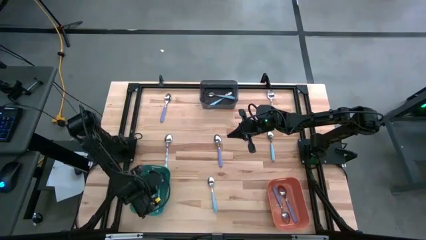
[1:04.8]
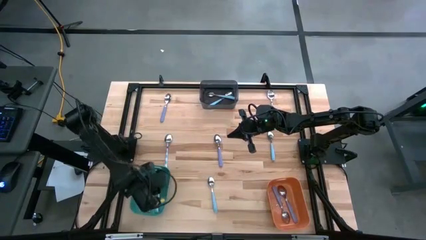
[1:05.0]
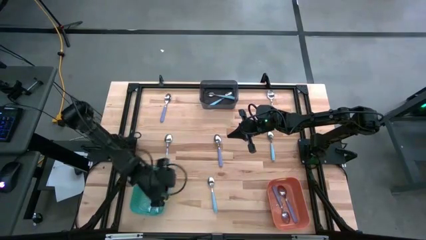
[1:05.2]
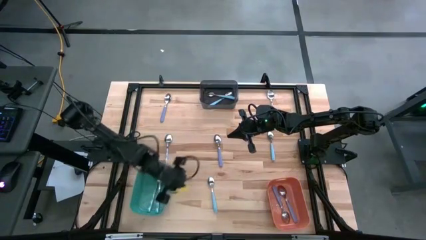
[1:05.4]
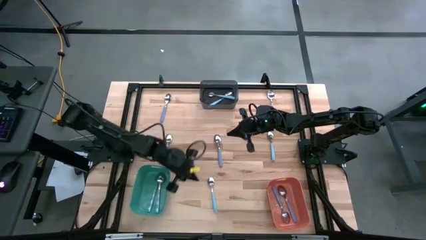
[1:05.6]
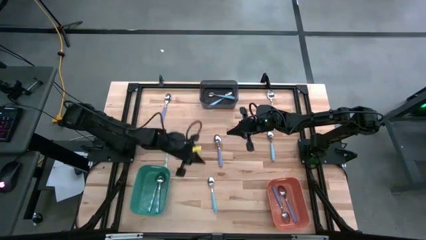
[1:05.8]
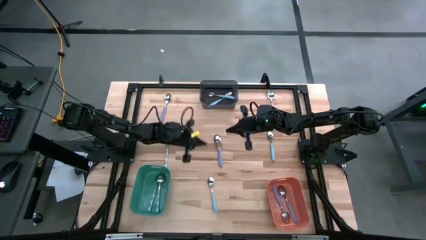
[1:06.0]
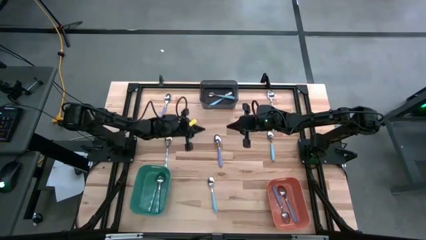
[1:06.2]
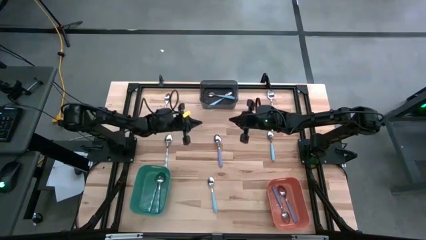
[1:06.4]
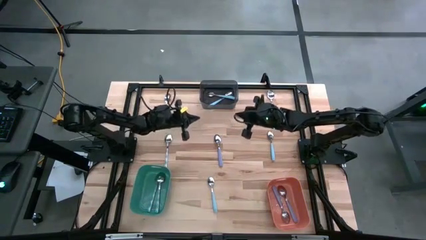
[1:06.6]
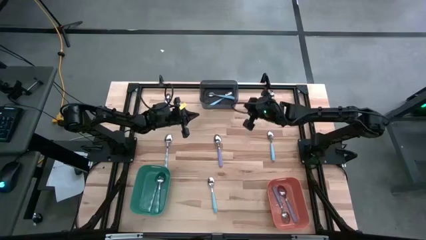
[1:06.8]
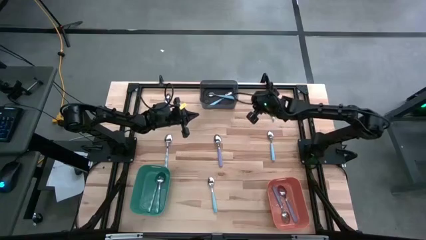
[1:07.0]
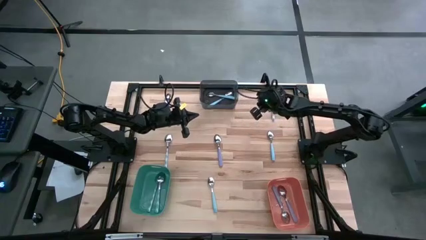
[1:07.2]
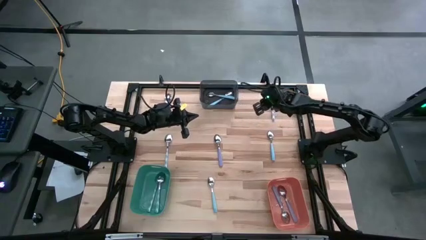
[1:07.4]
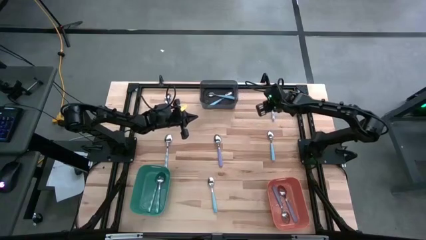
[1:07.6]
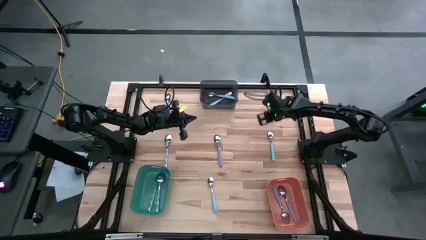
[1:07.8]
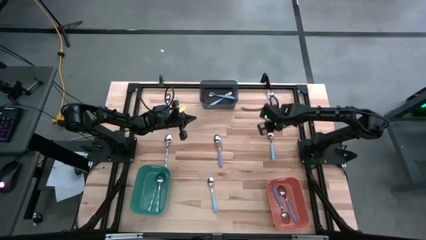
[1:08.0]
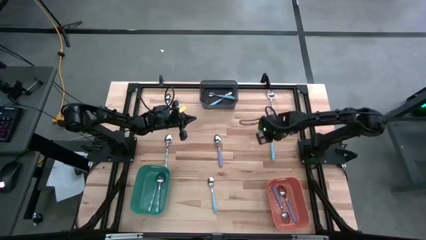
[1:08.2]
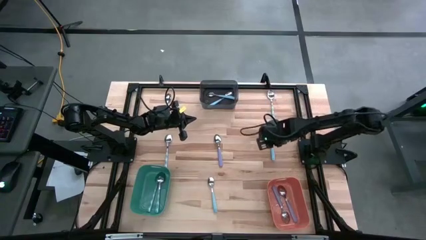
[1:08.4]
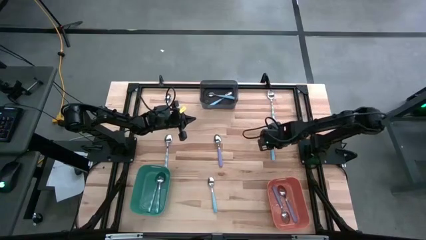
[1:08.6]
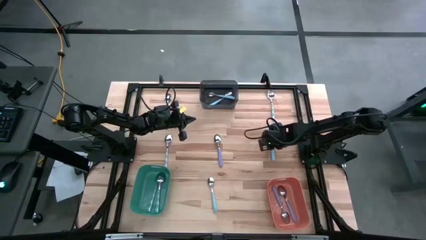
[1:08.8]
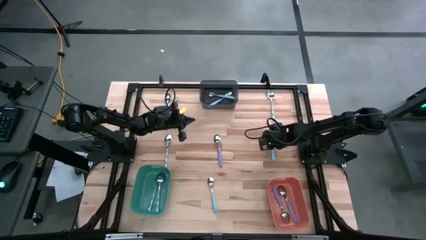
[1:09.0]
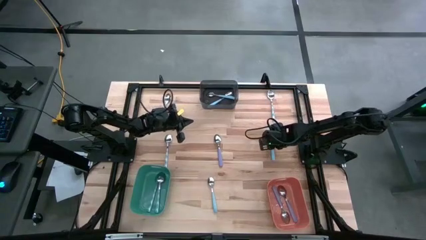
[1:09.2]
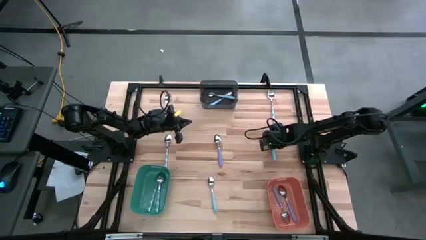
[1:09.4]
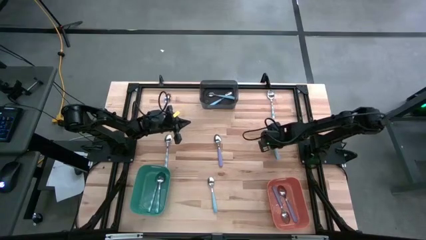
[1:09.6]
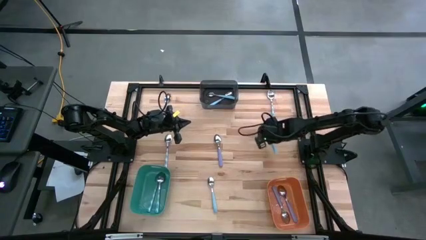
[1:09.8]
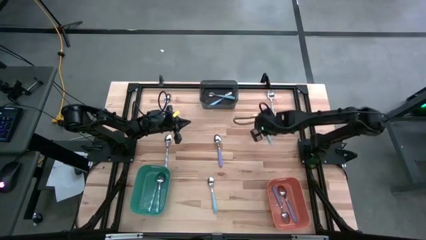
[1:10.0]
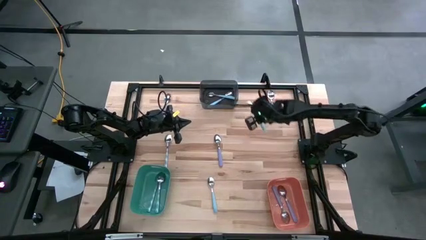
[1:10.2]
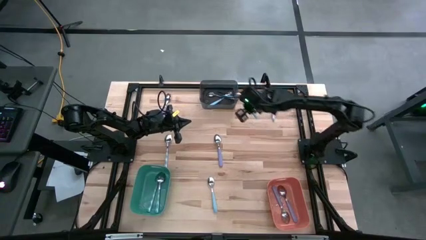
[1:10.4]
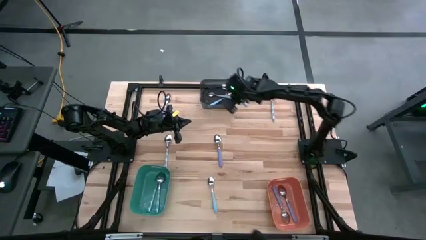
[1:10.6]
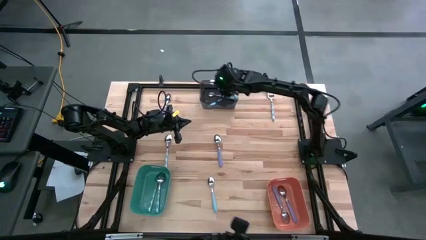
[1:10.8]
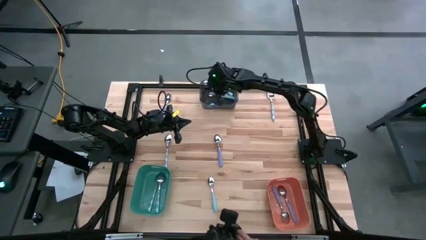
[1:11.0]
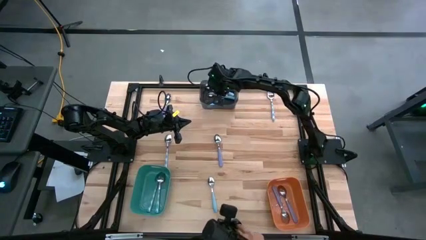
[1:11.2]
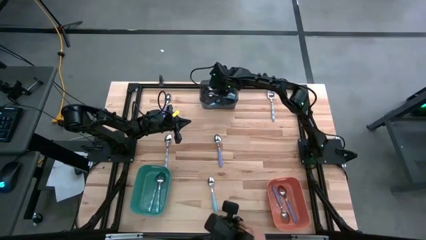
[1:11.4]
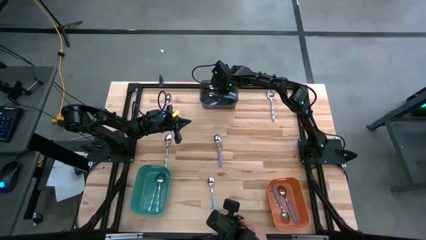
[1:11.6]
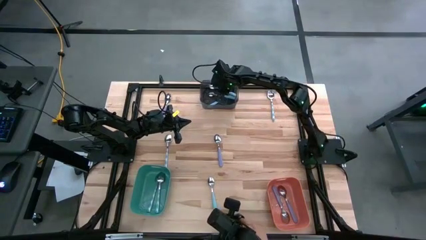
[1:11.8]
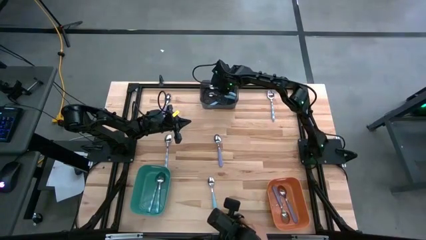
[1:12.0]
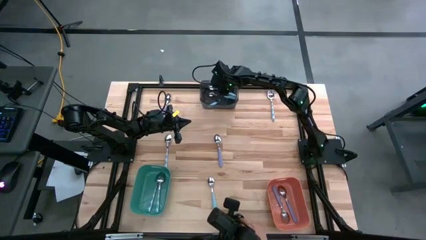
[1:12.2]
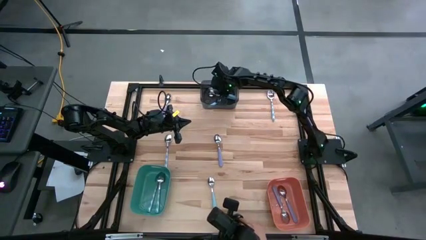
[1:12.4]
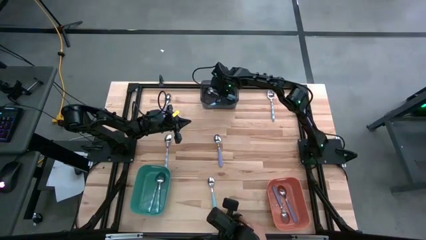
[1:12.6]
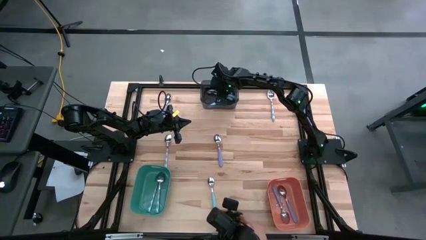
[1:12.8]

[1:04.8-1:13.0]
Task: Sort silverware by color (type)
Put the blue spoon into the black bin

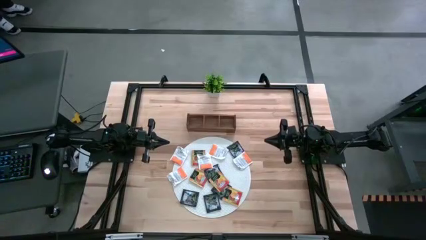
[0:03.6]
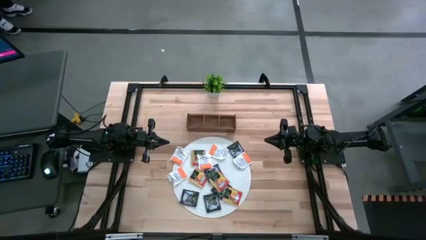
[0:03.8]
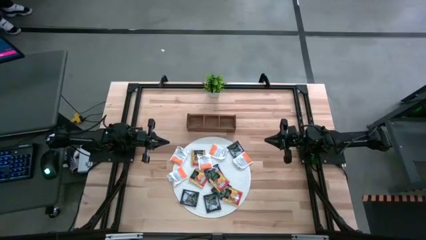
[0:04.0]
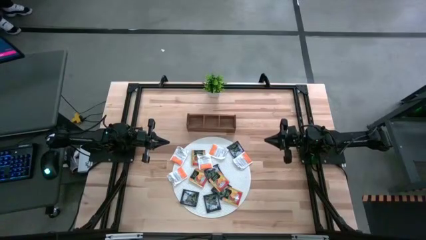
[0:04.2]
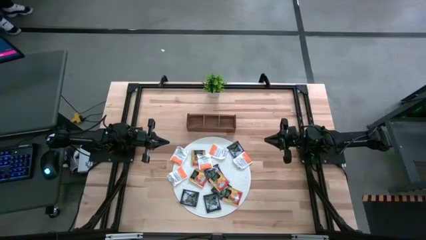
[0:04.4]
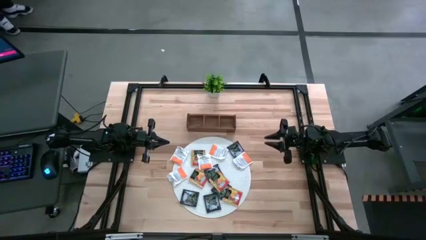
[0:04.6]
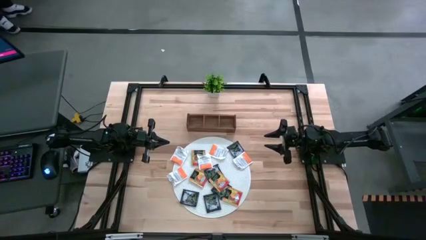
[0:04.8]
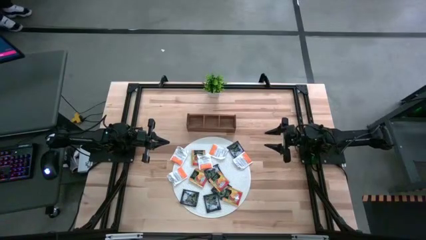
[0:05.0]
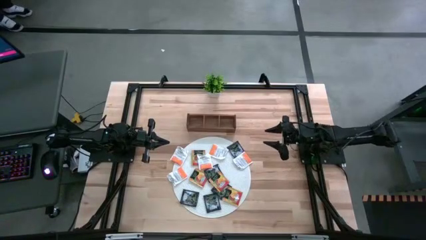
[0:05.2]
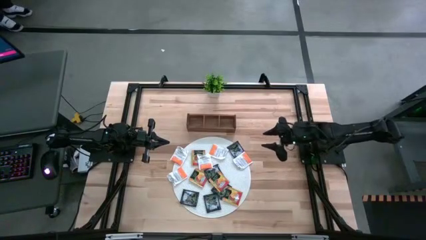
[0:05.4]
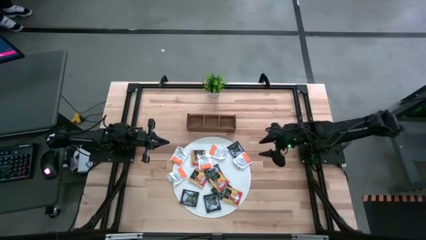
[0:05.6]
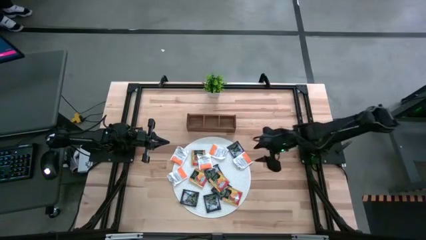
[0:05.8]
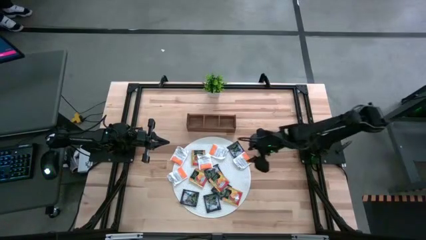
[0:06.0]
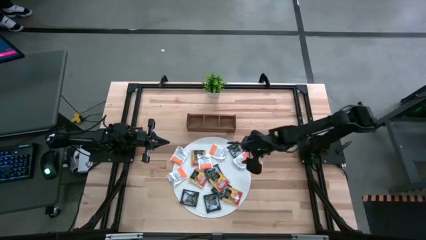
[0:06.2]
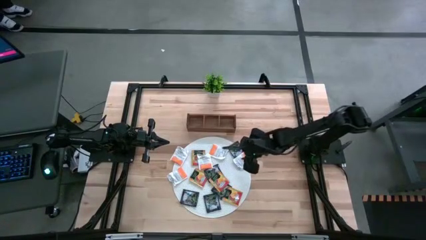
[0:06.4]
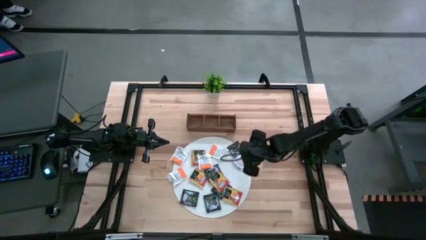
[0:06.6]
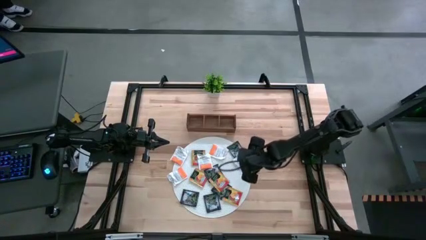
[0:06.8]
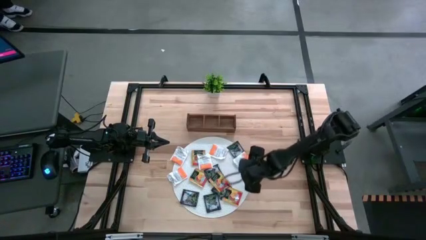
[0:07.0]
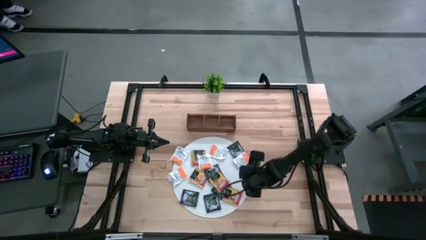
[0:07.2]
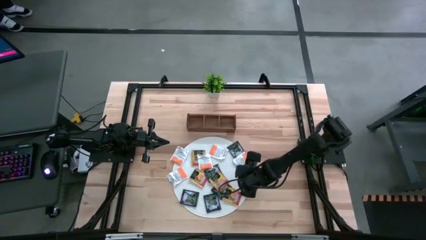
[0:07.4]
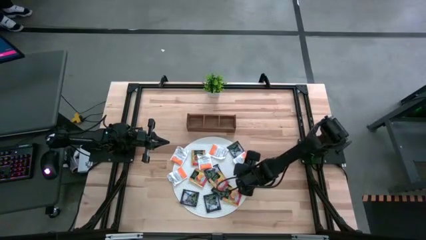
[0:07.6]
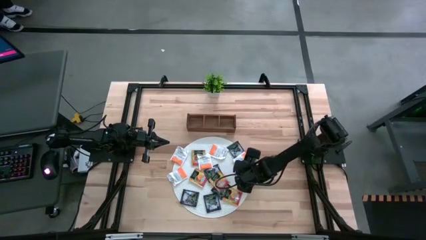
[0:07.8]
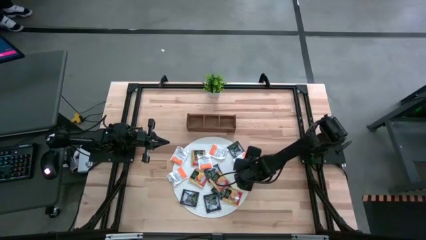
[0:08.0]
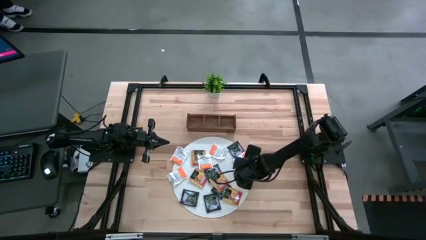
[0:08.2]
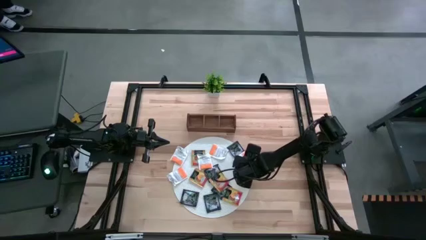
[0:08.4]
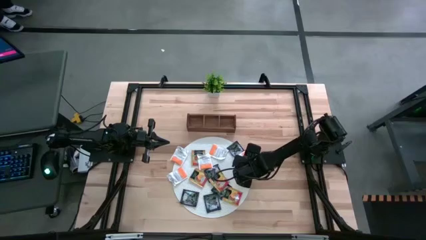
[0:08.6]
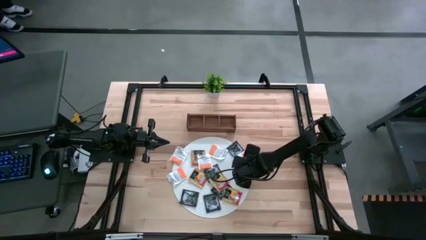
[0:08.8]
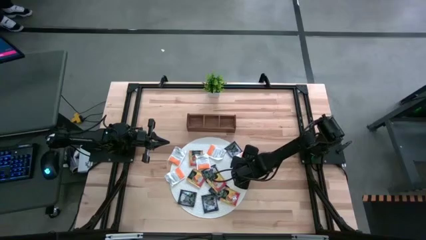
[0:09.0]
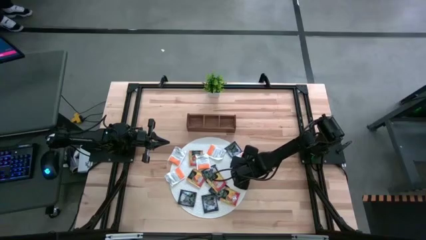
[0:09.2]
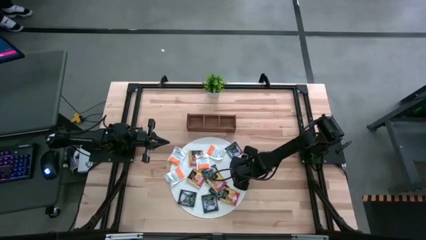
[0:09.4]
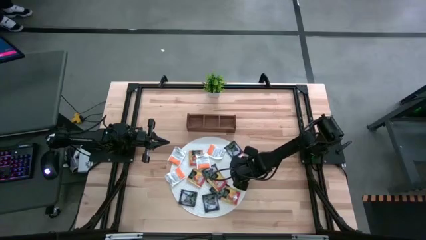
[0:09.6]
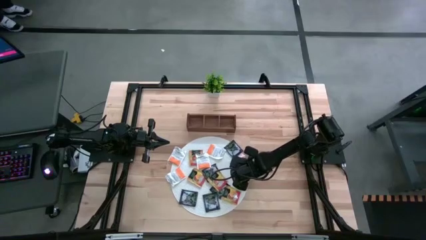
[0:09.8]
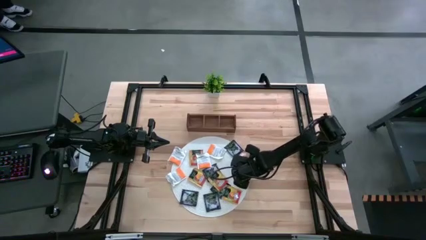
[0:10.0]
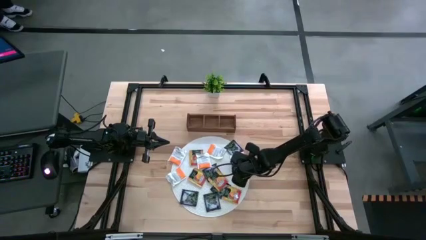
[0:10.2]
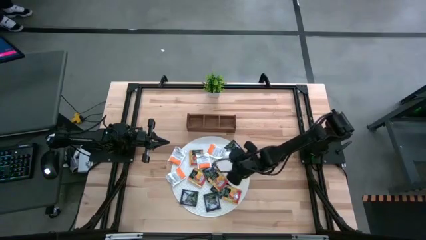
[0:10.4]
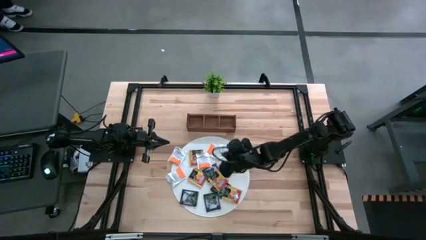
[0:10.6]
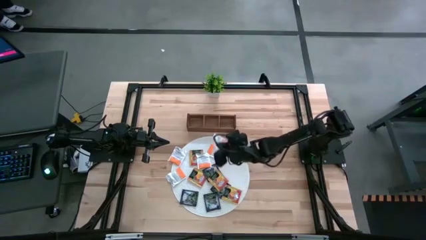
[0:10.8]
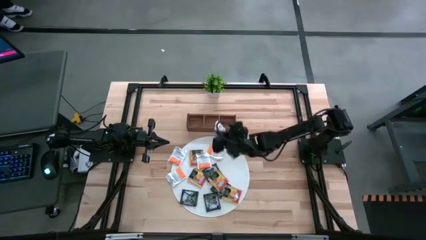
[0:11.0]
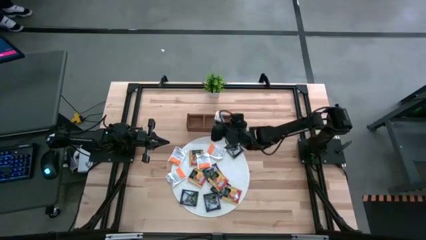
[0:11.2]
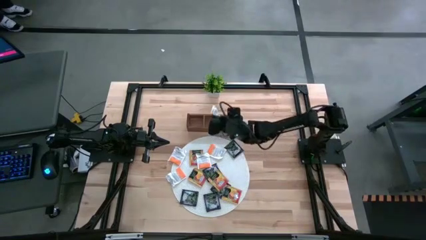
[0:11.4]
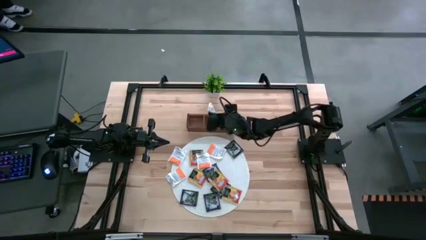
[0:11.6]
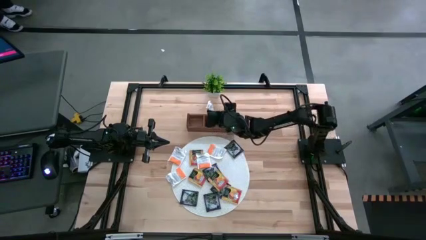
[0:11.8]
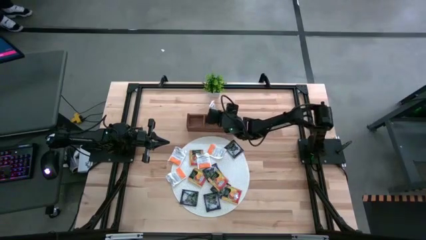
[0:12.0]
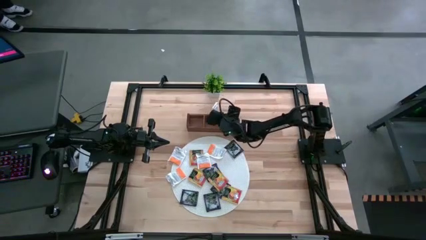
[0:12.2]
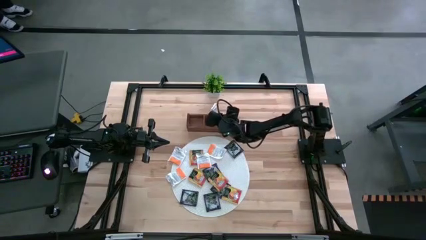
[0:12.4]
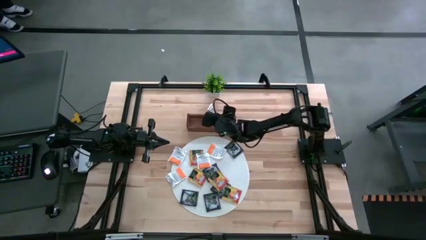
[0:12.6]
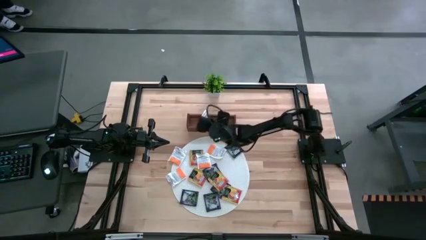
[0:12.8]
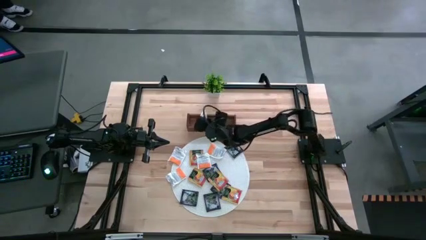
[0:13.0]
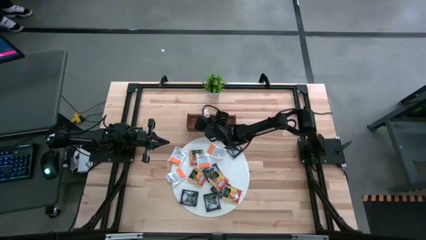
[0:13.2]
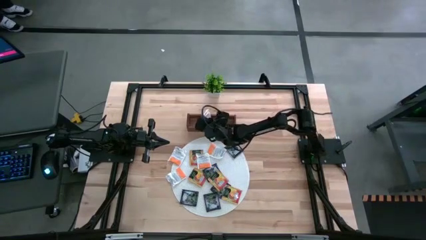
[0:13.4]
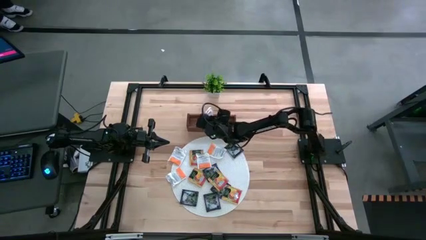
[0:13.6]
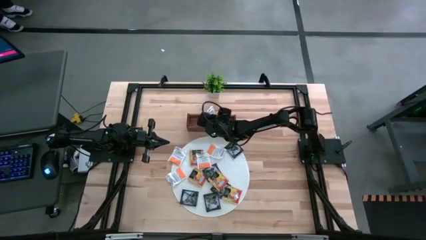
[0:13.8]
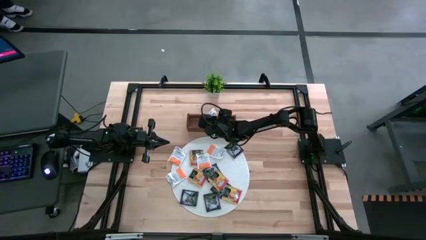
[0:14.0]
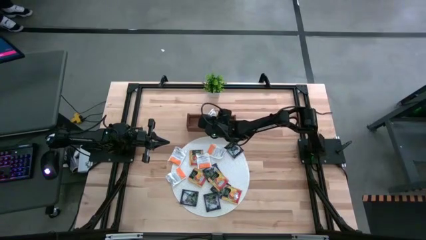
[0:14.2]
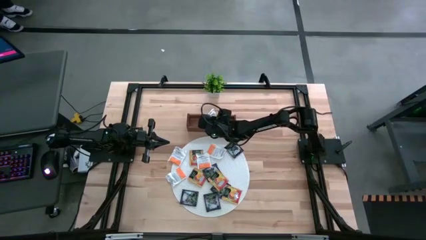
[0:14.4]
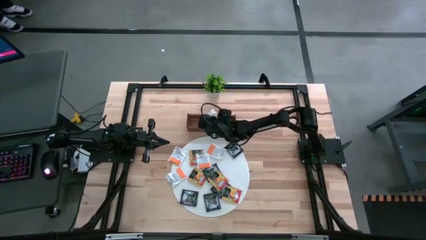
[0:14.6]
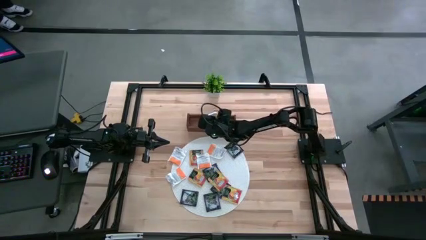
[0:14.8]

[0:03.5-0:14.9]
Task: Pick & Place Tea
Put the orange tea bag into the middle section of the wooden organizer
